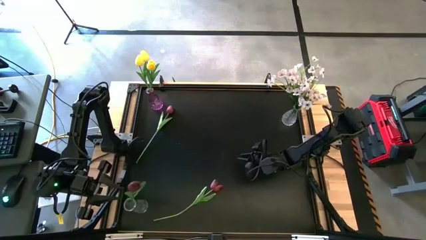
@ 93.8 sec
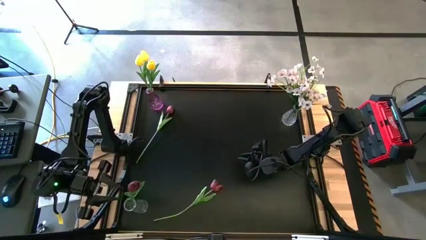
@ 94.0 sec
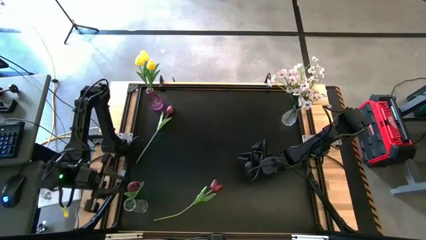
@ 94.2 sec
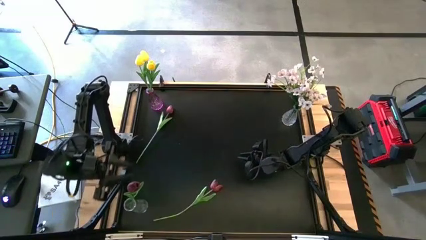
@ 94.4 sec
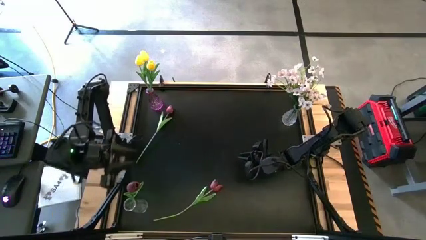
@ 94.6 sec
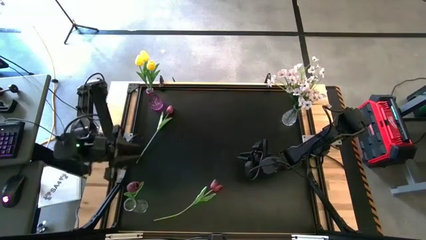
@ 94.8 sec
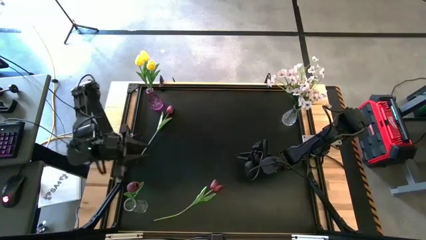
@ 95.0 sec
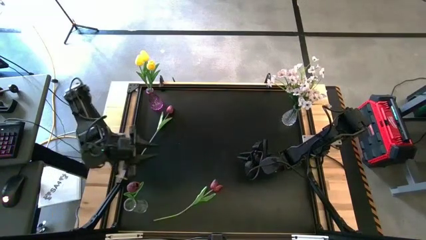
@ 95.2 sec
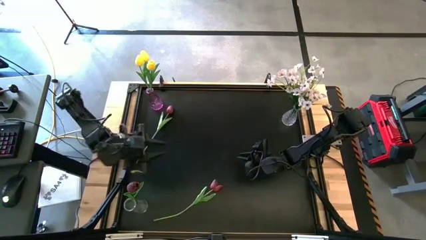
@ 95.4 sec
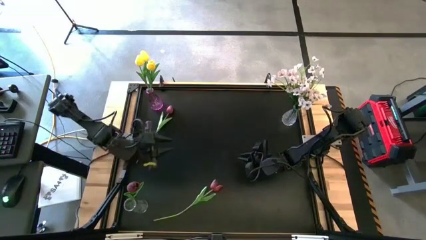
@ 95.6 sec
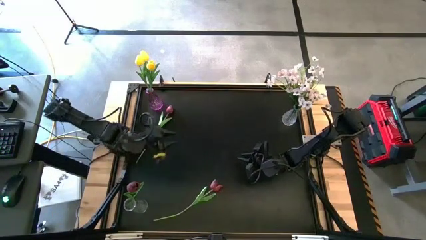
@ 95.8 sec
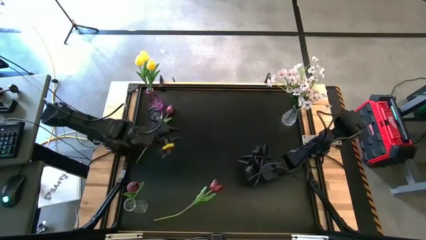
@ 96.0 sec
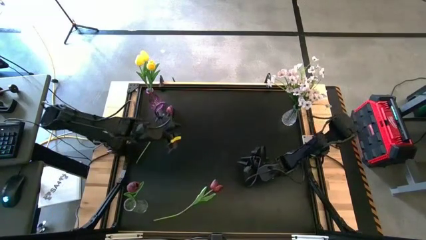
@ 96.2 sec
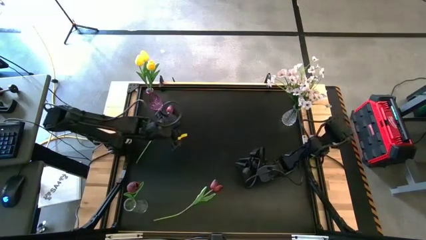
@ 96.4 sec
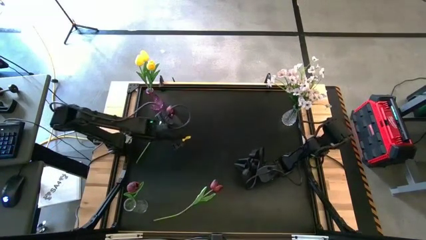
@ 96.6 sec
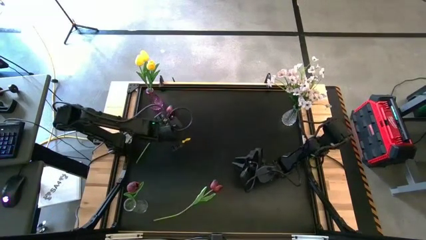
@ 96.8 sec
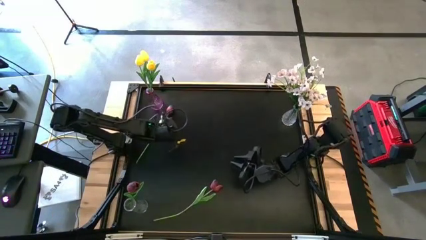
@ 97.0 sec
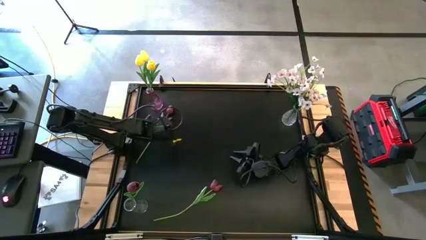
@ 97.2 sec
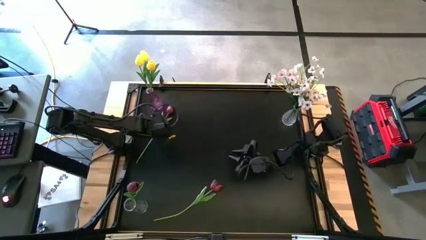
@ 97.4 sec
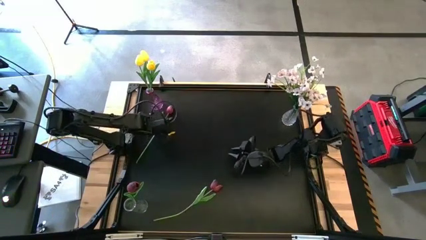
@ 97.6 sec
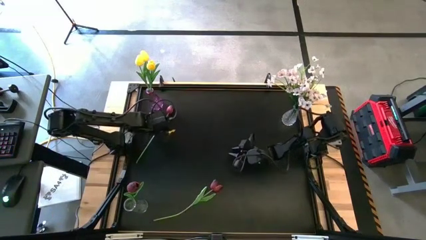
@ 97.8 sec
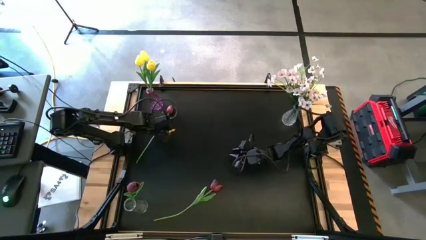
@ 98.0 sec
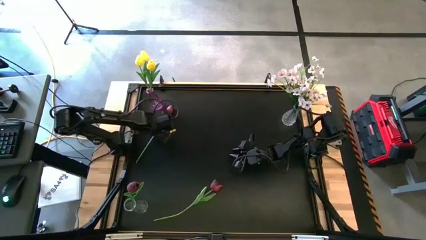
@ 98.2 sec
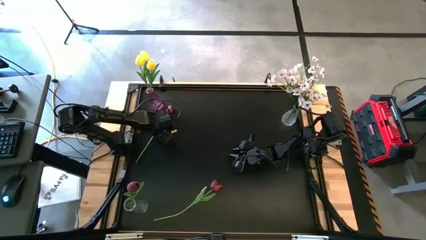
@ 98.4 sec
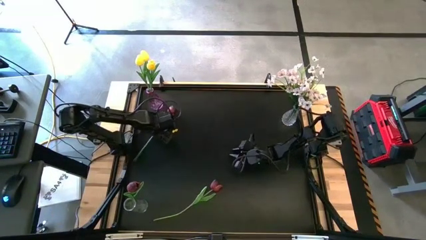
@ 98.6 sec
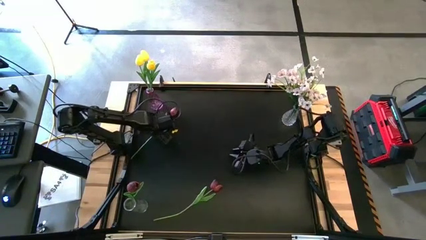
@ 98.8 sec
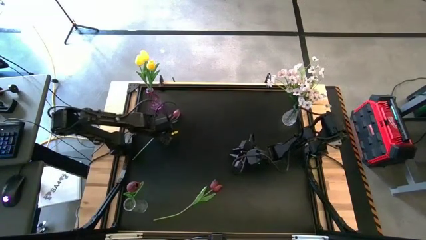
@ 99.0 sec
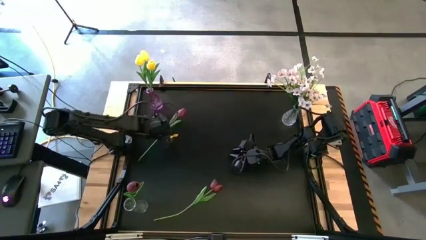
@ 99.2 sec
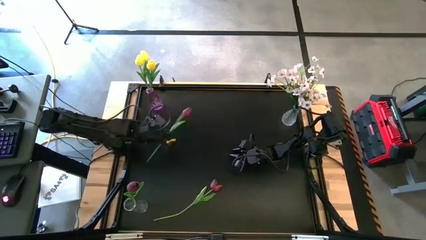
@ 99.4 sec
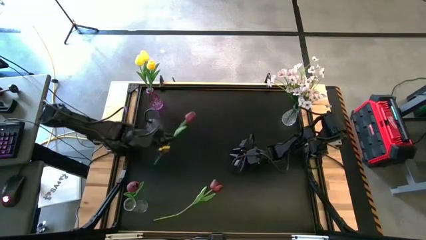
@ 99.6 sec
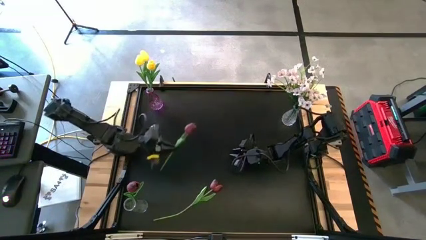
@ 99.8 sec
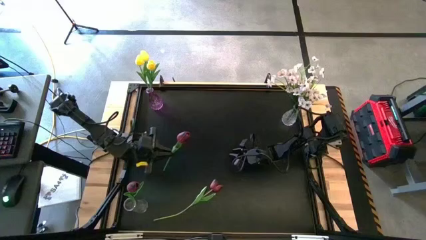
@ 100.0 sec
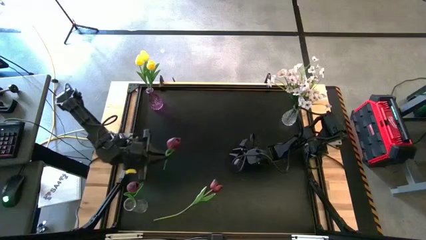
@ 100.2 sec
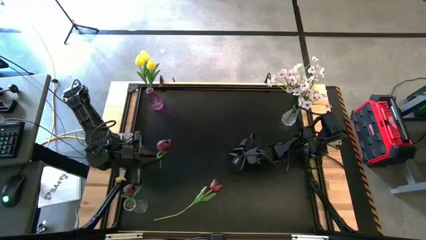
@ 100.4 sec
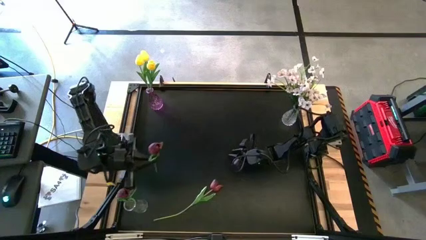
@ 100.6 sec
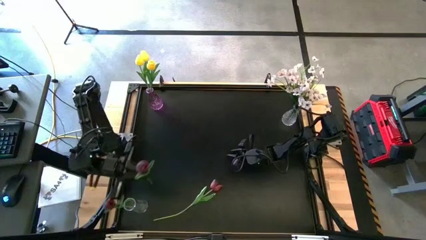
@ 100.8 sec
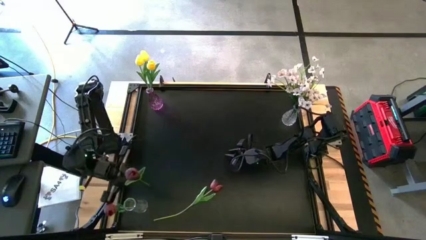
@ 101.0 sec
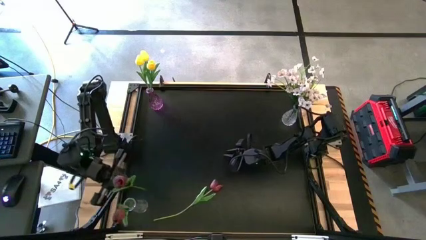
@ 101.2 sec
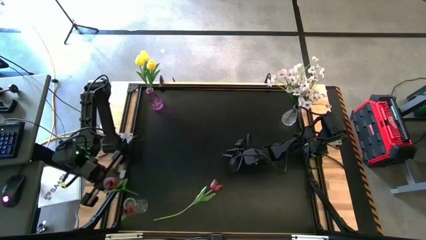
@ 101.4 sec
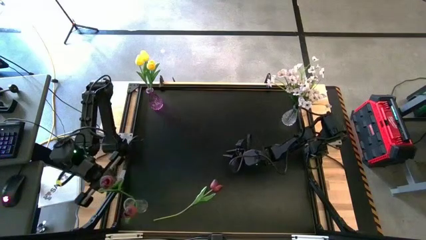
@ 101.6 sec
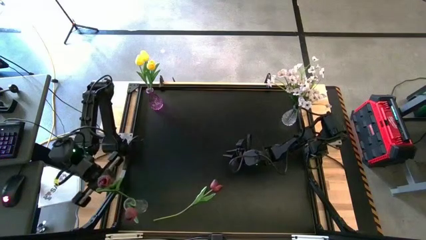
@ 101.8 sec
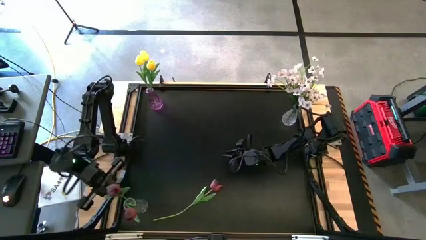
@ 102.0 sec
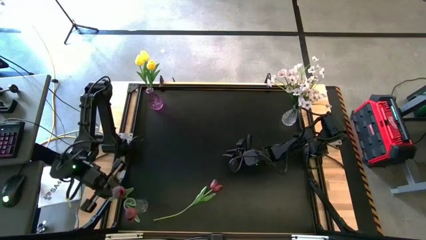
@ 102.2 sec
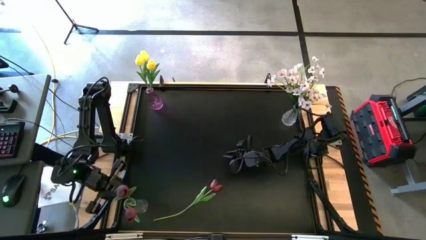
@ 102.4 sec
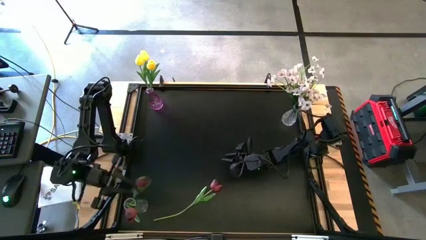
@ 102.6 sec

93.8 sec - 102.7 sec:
Task: Sort flowers into vase by color
Put the top red flower into the bottom transparent vase

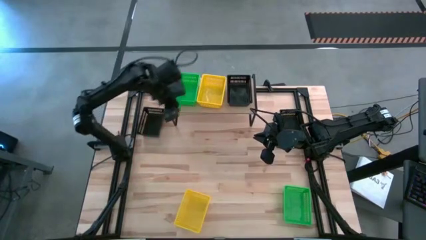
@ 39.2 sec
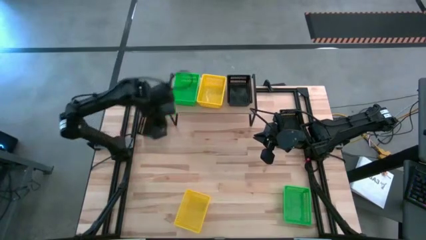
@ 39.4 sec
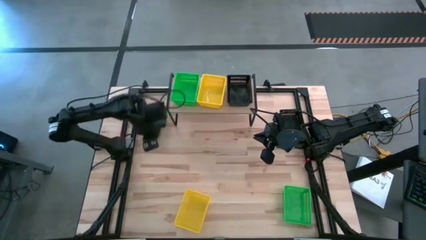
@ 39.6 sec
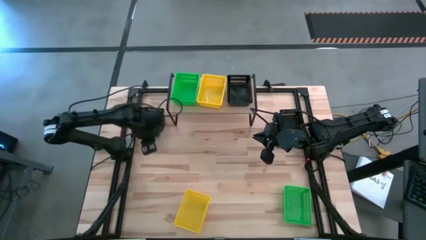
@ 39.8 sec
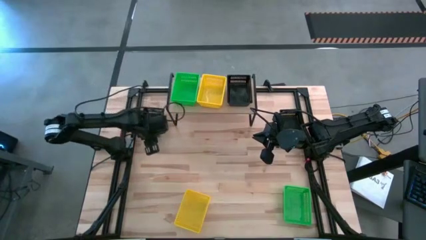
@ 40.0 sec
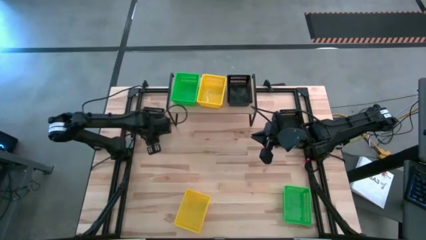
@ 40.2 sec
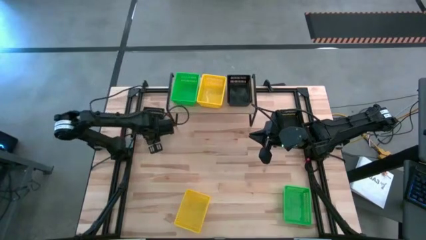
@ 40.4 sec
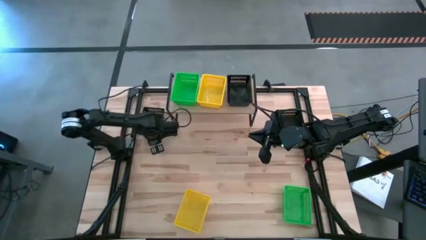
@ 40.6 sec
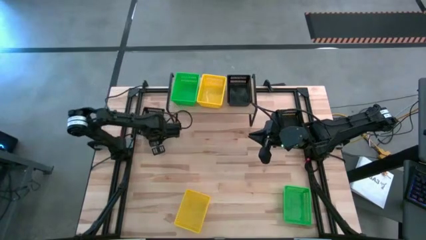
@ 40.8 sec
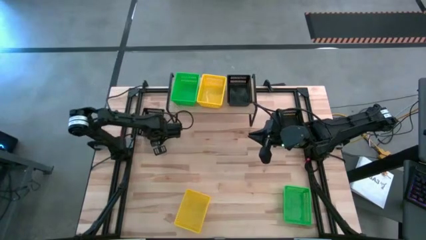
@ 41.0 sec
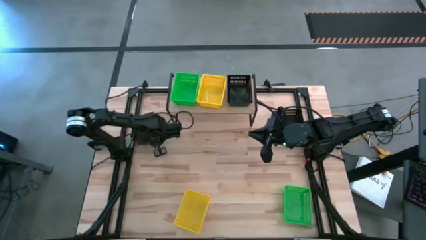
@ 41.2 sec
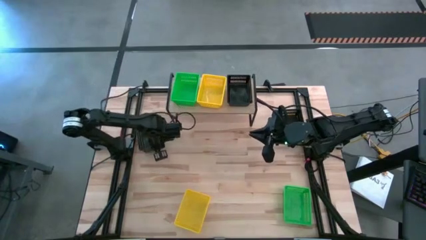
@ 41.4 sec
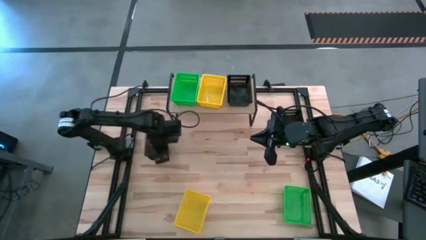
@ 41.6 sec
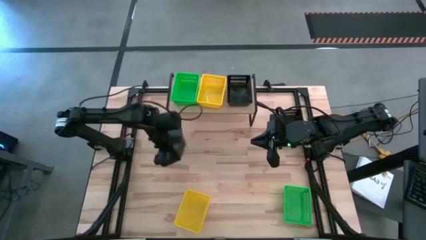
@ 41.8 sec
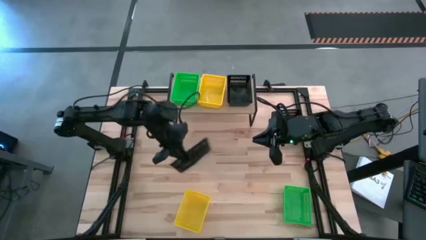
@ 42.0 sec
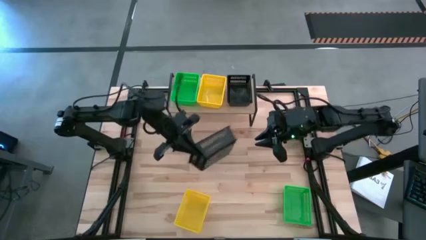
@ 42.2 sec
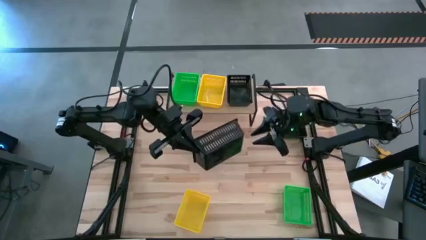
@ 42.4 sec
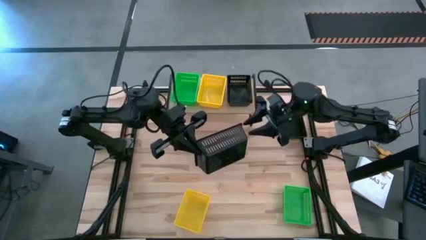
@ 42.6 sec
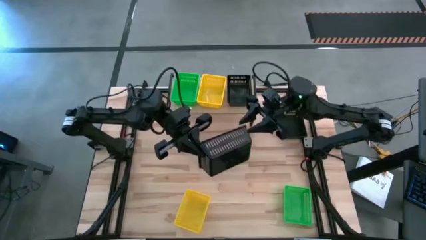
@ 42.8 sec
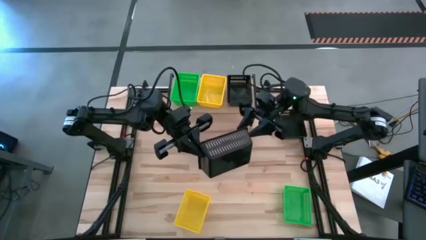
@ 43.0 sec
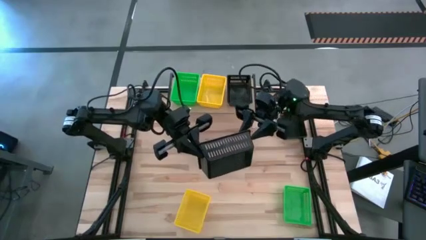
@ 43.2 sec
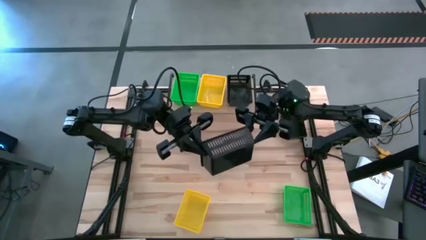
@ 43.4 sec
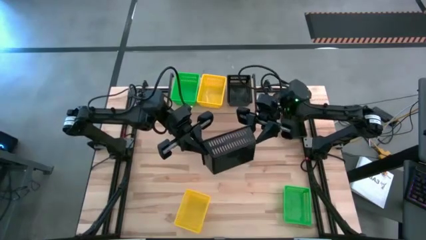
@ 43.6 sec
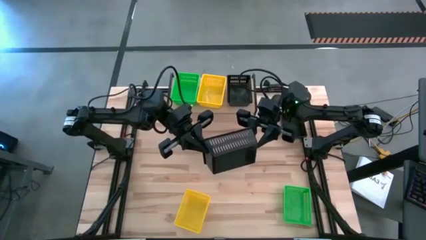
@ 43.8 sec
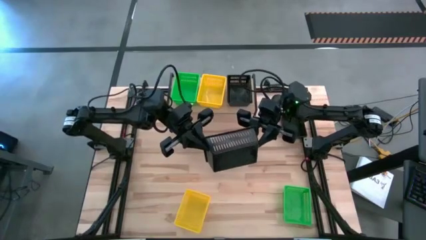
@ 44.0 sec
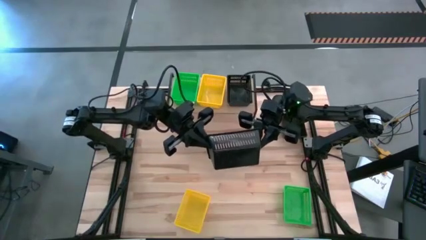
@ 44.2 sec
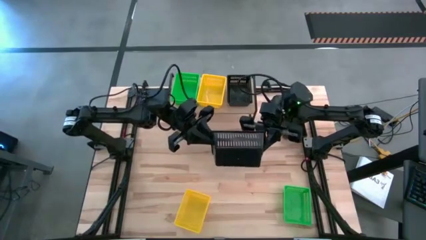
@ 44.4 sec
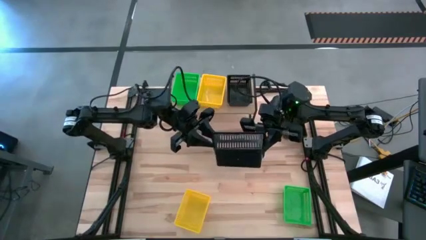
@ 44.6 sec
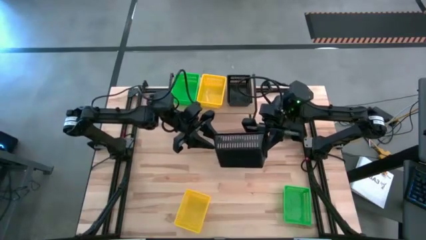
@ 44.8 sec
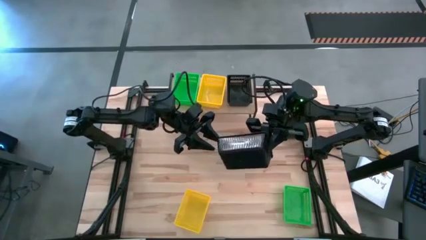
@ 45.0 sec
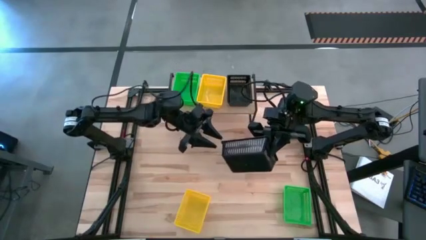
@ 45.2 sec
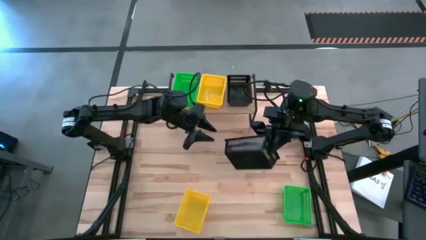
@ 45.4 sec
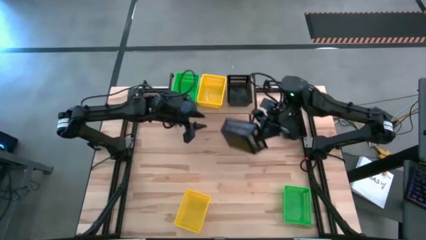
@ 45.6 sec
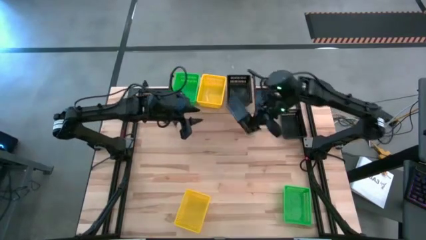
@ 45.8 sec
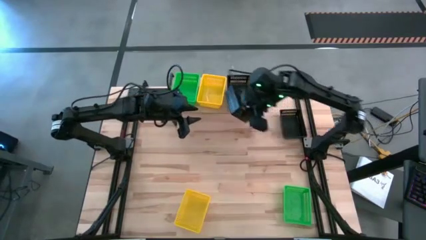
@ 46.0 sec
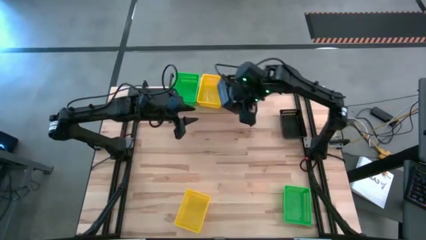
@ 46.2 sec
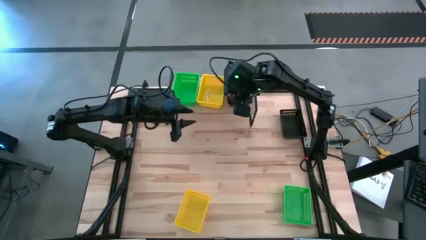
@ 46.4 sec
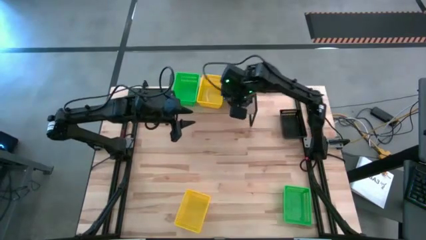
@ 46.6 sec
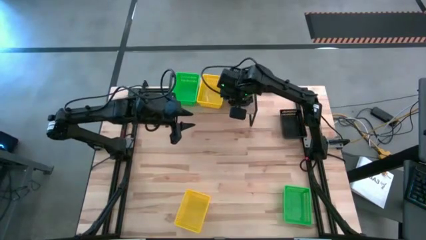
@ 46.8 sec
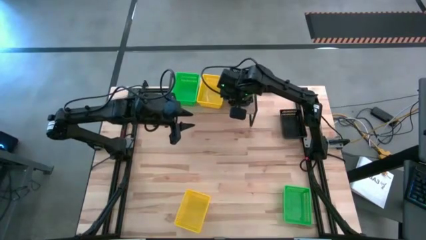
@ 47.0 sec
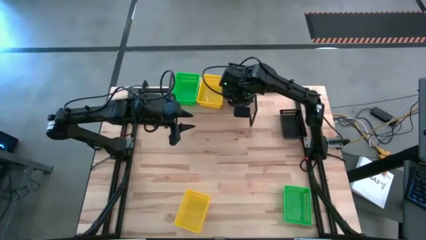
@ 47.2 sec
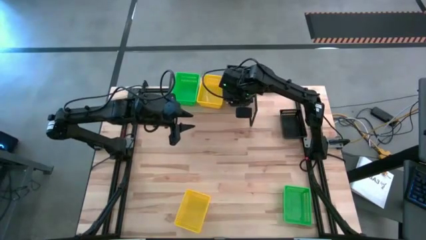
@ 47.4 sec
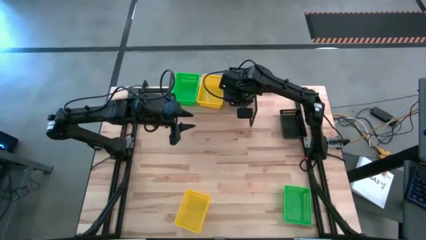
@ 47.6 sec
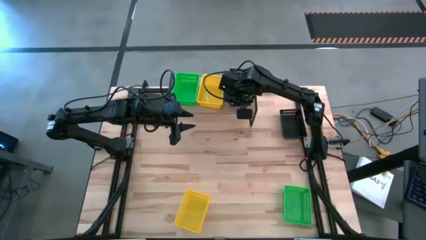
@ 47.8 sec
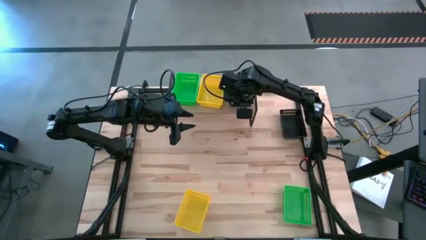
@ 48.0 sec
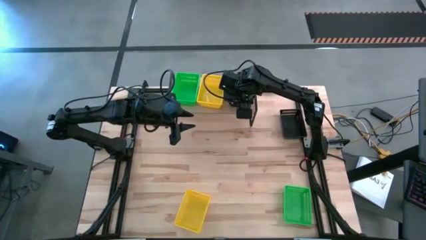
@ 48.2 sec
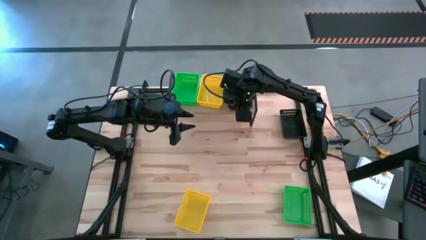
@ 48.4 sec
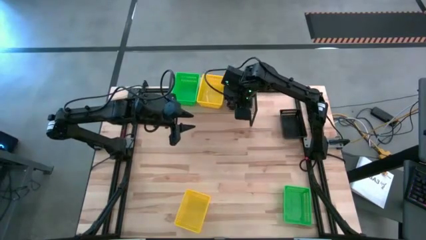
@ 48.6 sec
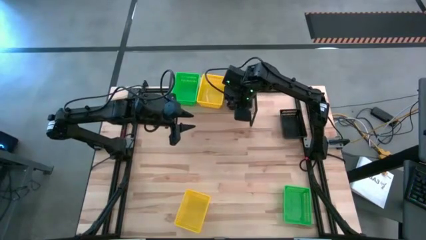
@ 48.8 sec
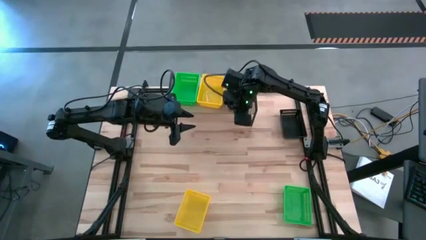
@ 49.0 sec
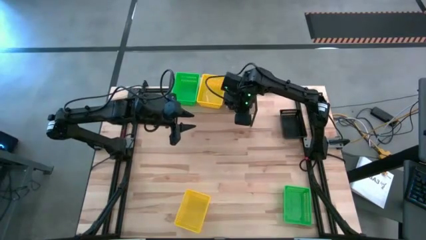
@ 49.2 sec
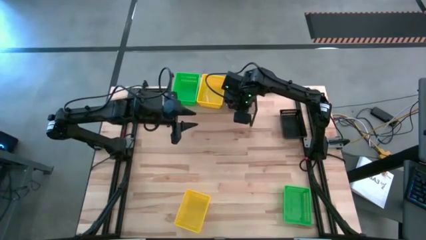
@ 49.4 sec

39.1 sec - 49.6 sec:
Task: Stack baskets on shelf by color
Stack the left black bin on the black bin on the shelf
